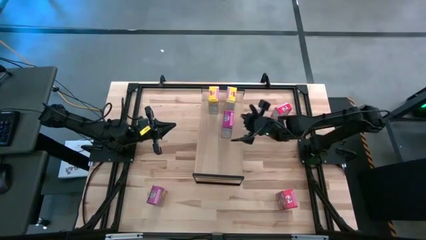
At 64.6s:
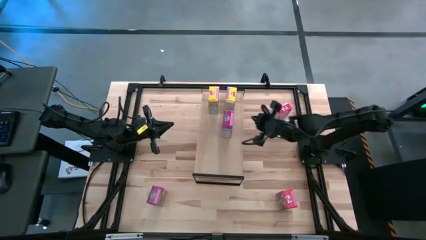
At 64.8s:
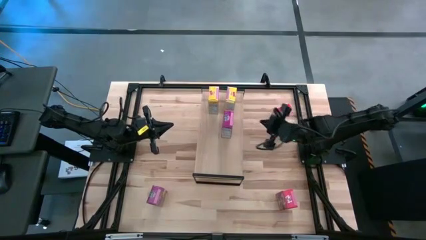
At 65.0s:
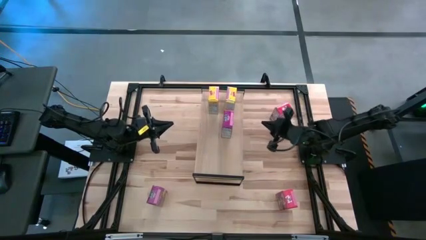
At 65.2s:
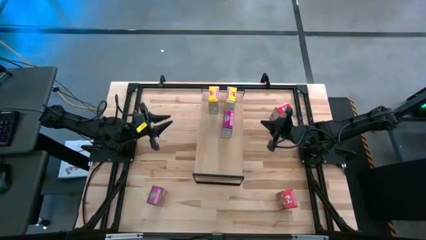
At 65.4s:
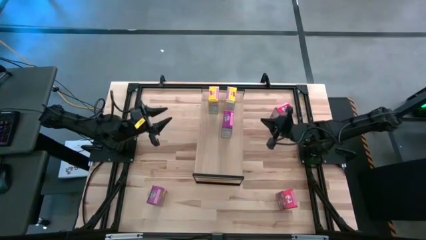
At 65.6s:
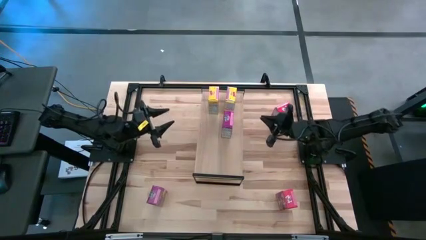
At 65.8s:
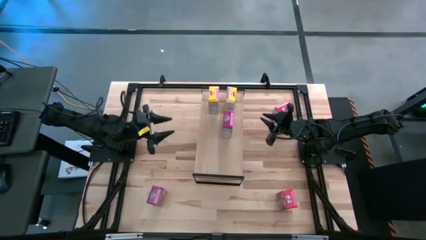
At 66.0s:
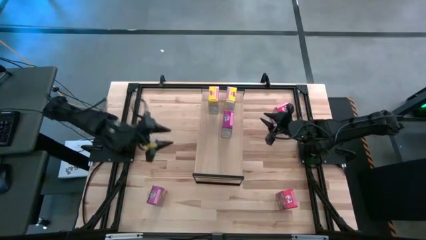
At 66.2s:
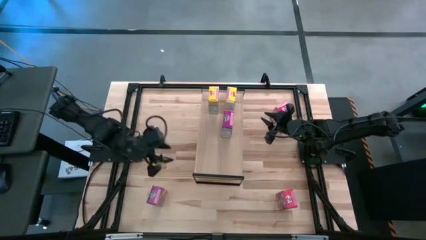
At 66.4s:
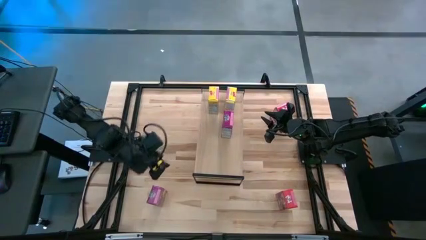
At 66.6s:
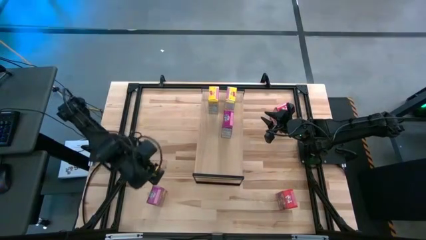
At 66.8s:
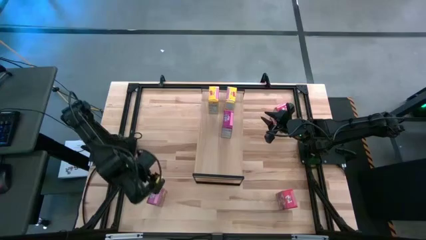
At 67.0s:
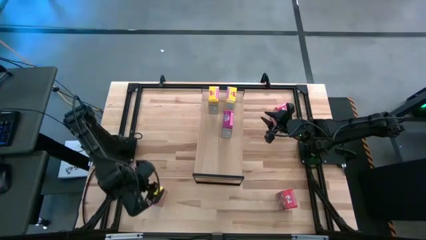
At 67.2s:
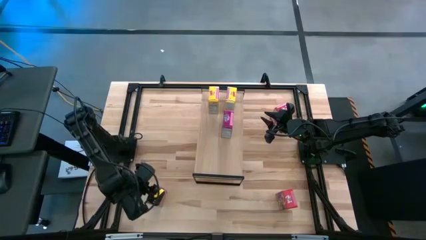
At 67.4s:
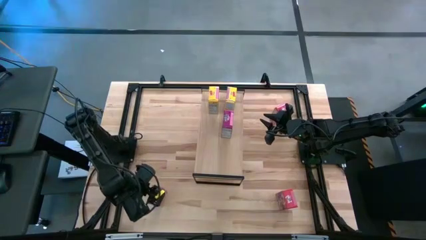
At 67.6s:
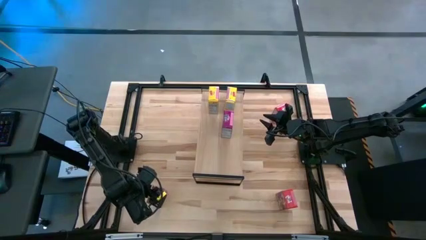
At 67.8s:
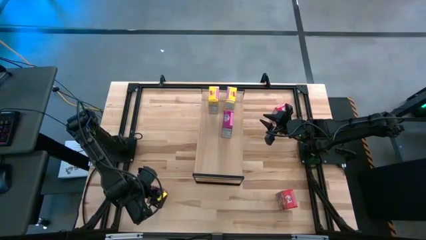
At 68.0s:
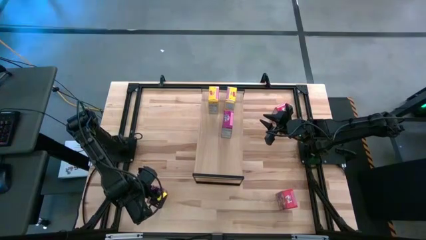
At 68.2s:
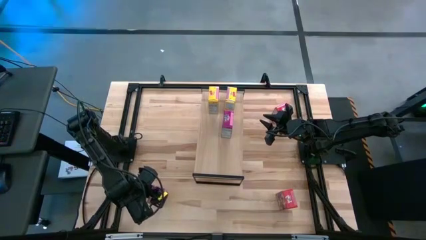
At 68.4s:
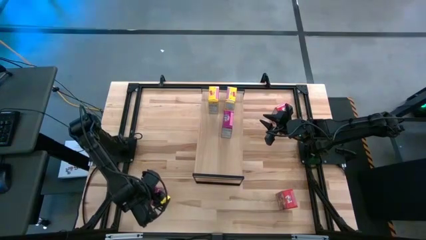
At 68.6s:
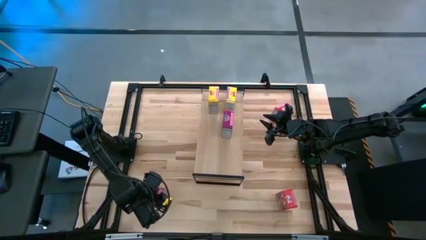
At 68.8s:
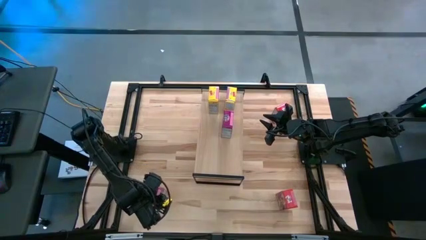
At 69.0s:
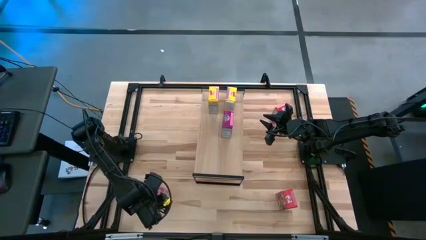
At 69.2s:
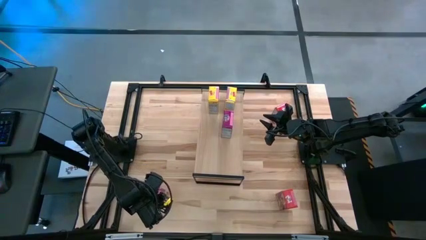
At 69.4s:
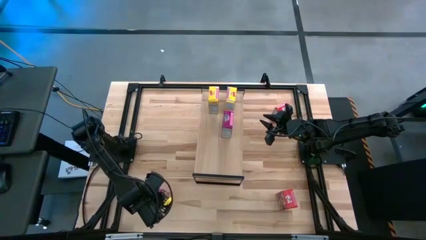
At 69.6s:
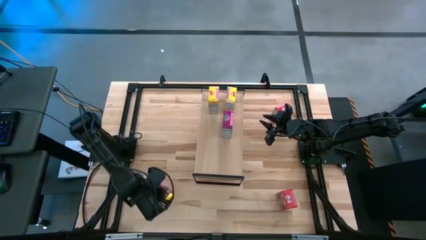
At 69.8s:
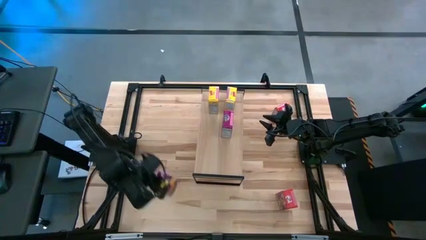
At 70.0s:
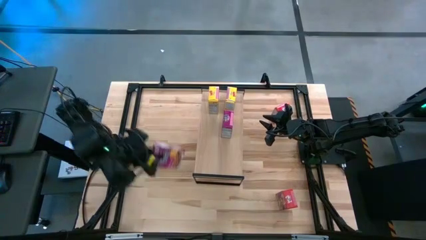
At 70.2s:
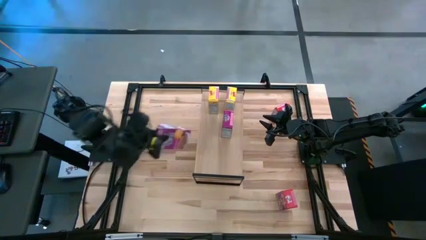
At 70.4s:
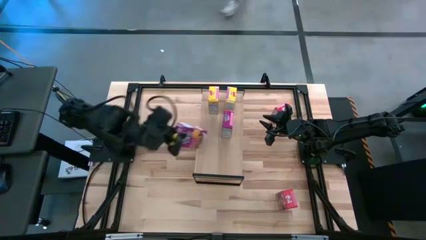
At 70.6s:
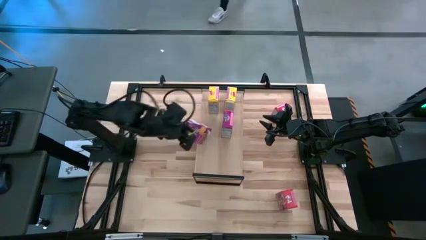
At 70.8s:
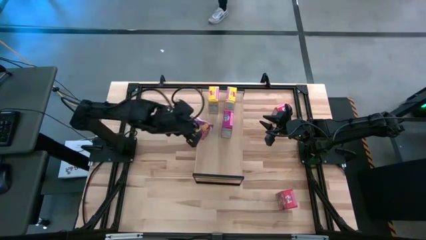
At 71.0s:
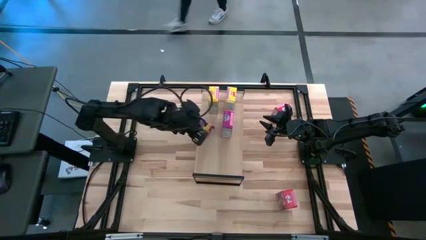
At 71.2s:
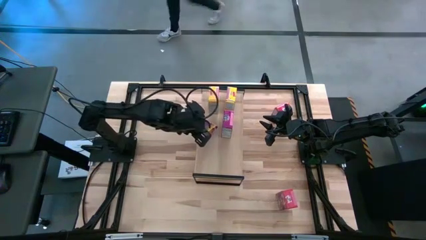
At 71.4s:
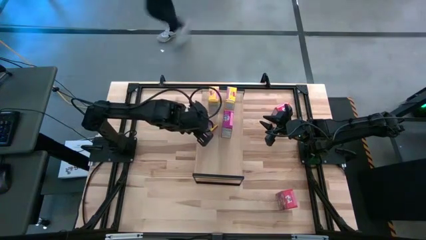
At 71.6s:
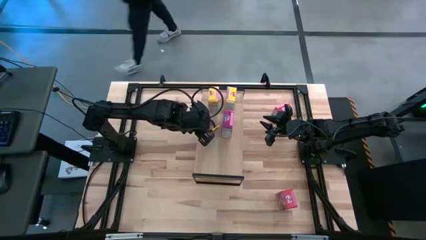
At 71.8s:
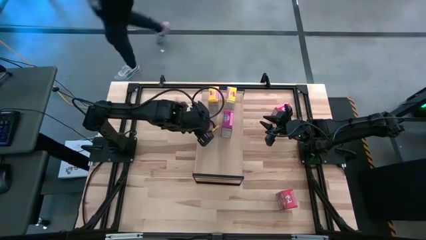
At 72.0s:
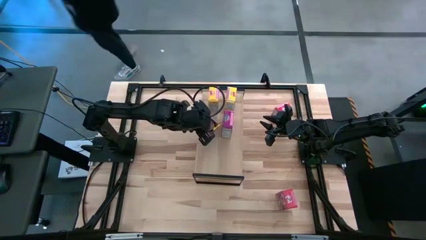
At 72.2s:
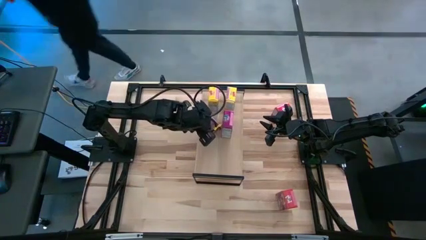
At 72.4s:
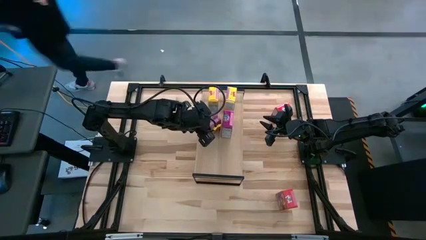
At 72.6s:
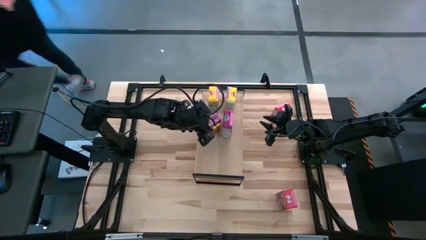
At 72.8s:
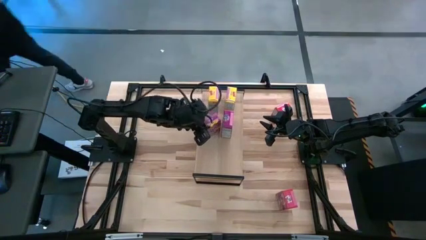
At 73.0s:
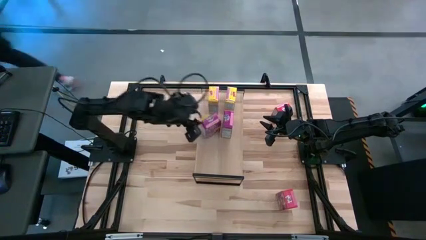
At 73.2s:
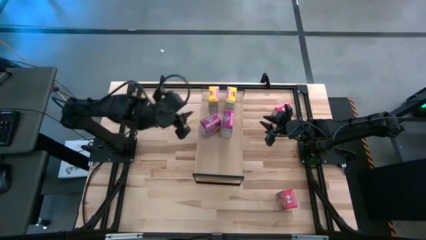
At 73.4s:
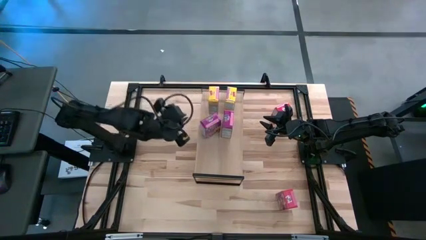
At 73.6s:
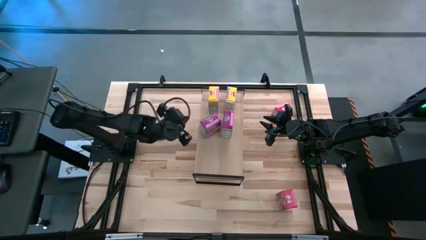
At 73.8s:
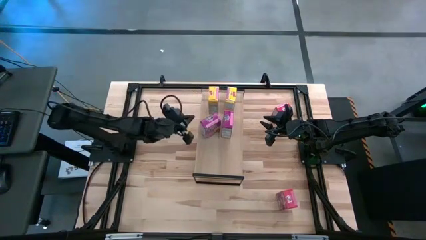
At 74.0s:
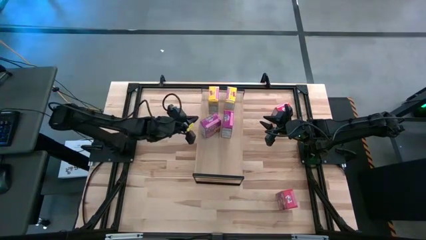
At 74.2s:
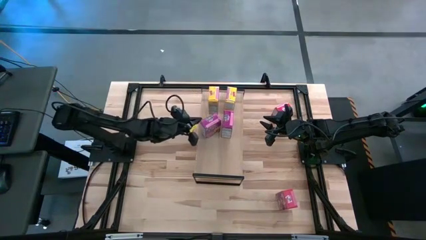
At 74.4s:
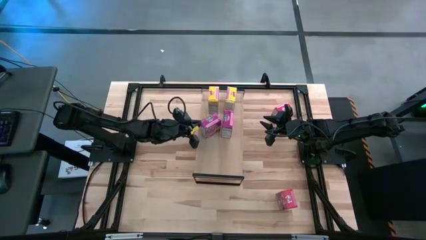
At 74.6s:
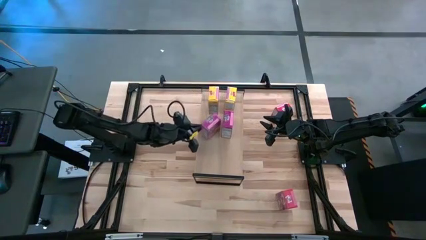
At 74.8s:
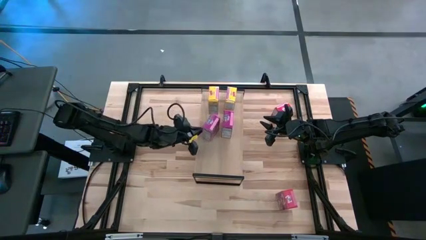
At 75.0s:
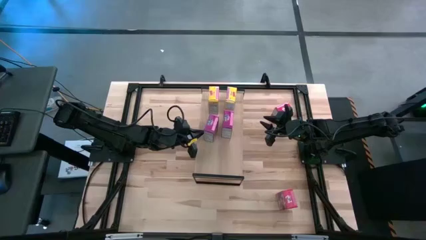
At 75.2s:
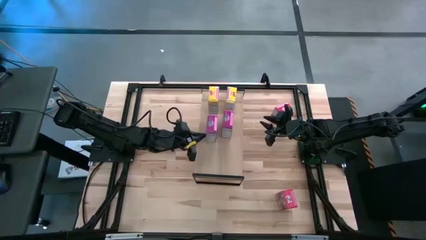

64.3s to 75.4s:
Task: Stack cereal on shelf
Put the purple cereal box on the shelf

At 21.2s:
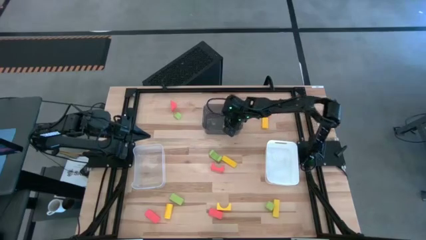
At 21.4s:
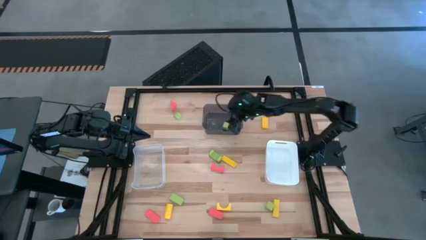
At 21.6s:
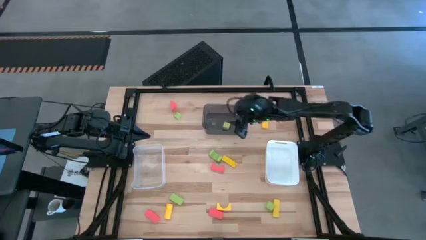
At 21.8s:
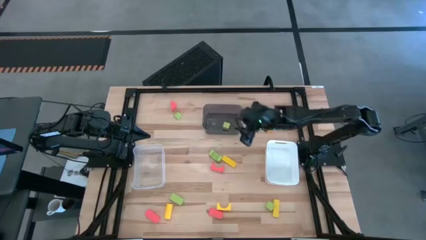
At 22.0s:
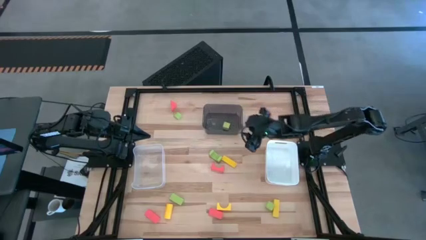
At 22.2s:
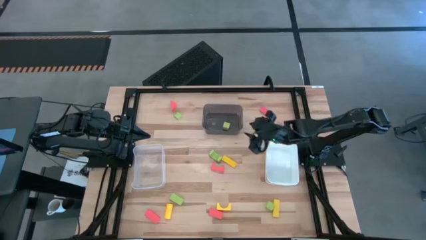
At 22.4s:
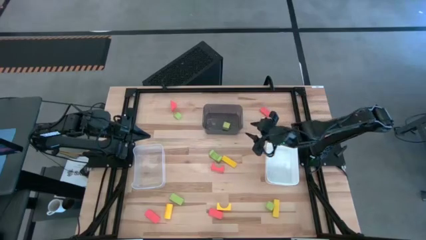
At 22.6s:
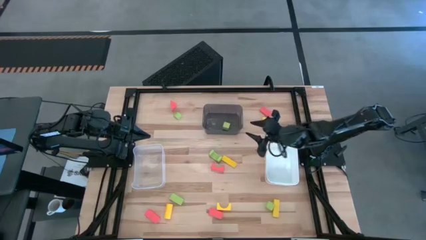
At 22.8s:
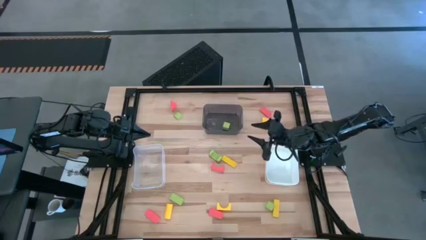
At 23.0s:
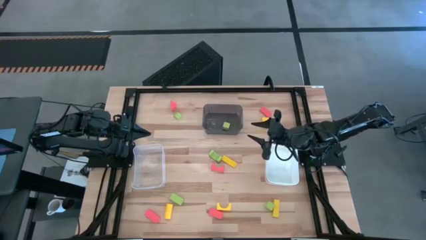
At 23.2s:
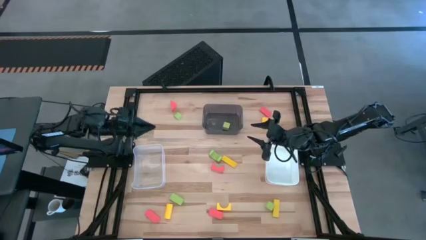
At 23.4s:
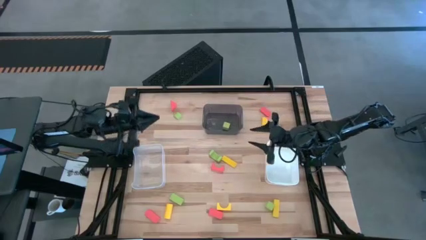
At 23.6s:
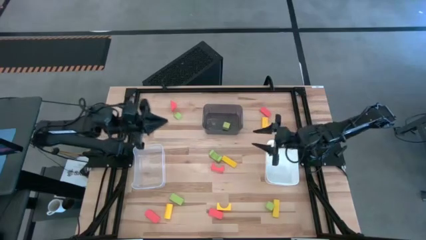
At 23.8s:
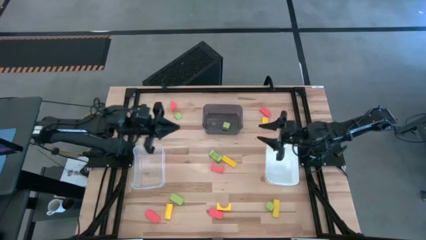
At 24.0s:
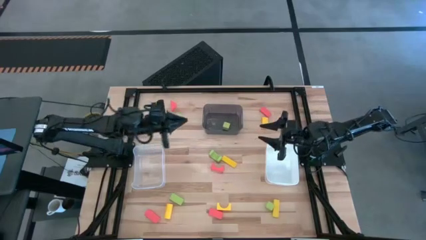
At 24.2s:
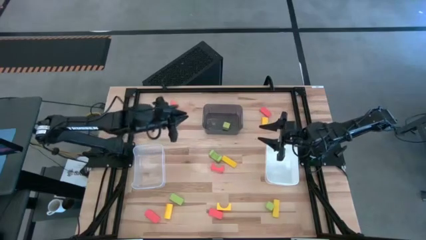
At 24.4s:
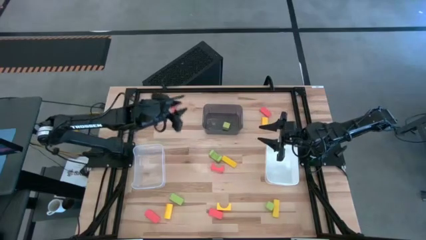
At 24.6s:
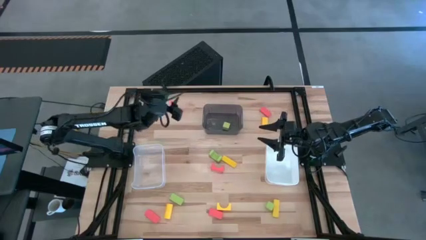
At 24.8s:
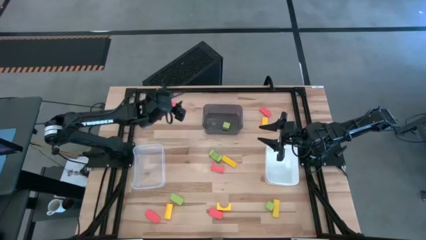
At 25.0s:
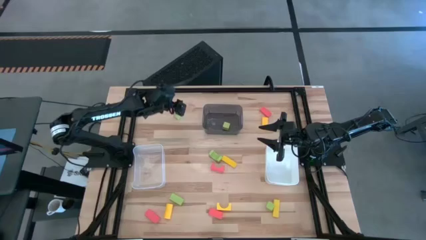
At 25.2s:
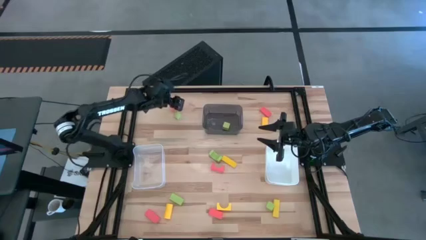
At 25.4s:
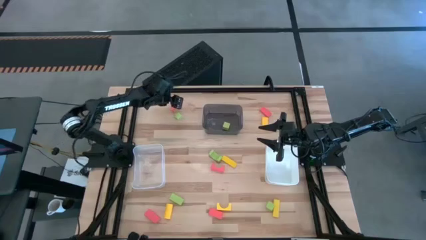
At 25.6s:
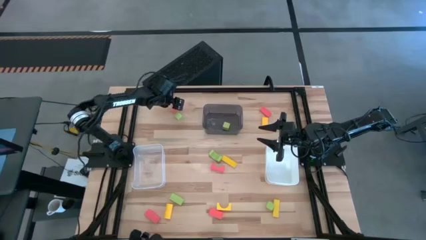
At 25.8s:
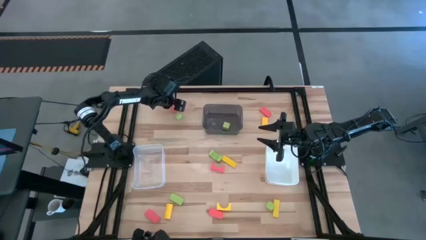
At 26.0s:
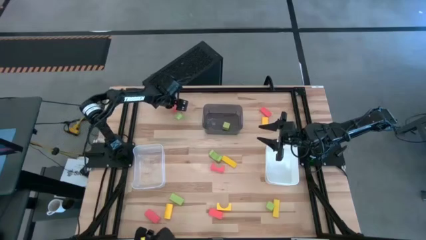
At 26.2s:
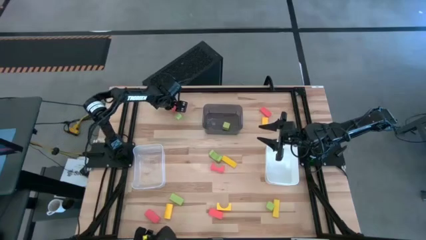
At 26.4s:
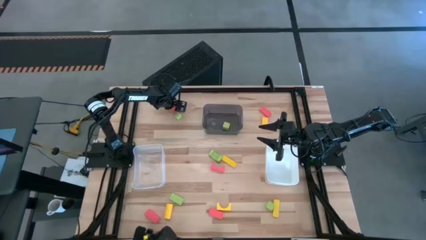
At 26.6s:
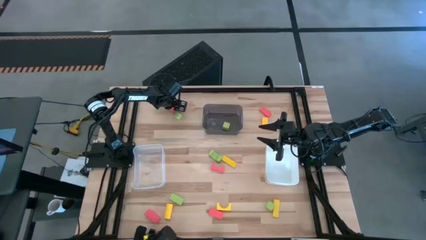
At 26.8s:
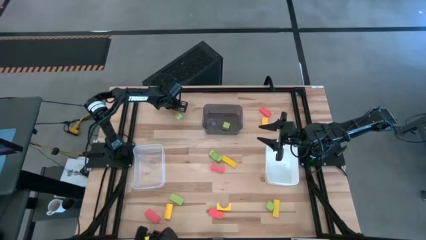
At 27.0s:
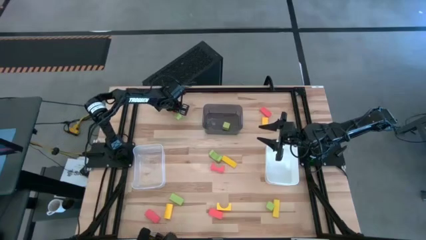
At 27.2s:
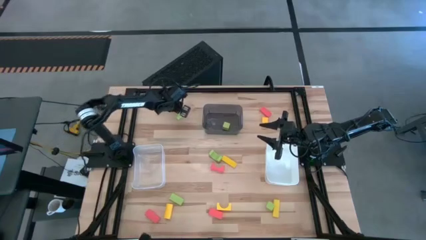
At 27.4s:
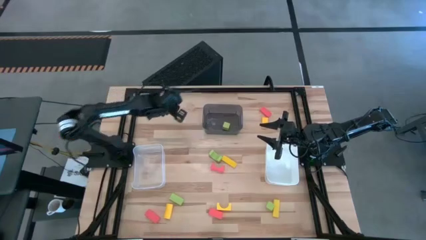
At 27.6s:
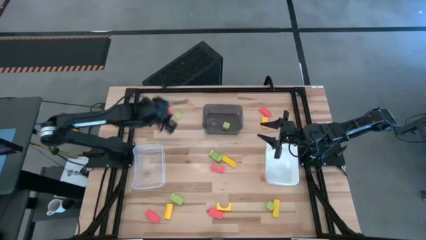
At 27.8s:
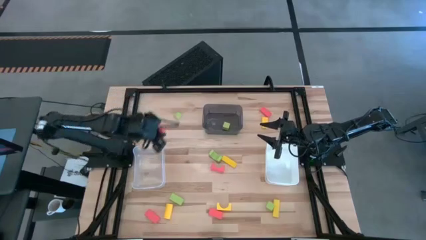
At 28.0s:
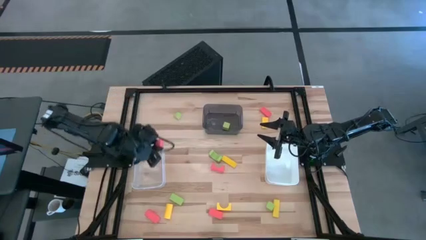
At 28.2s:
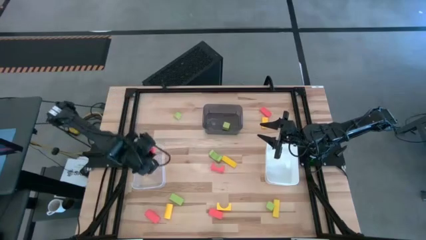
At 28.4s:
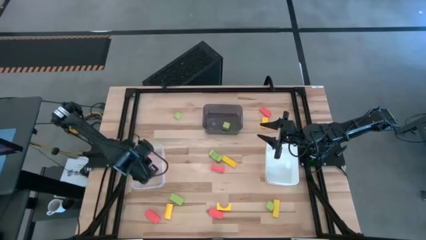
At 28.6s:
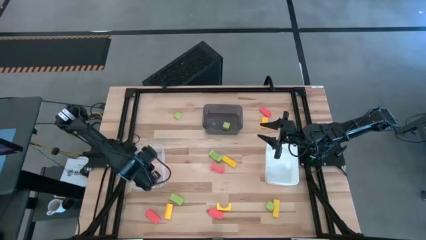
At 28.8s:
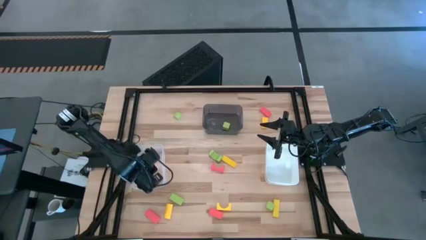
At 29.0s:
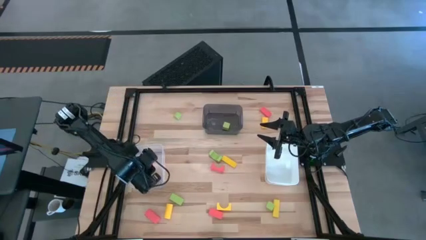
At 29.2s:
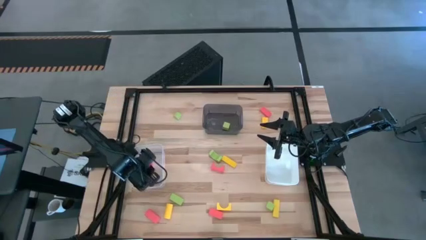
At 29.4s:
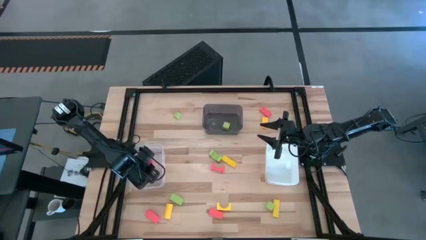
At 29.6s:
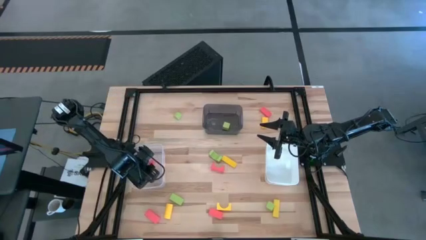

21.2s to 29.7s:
Task: Sort & place blocks by color
Put the orange block into the transparent bin
